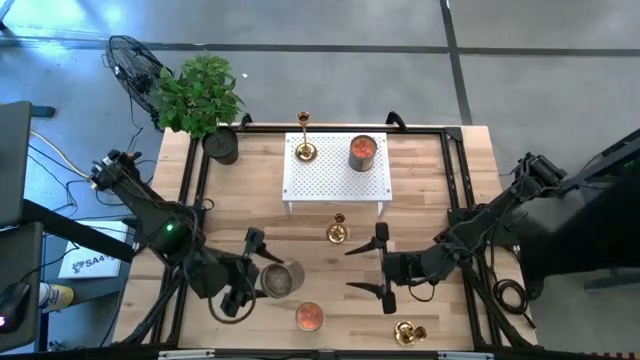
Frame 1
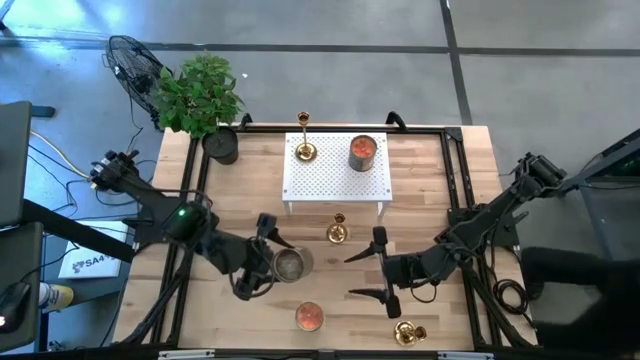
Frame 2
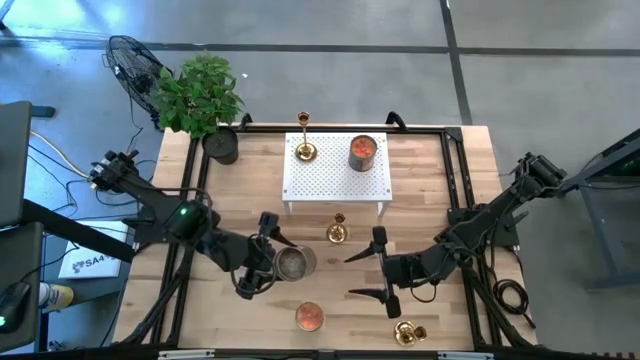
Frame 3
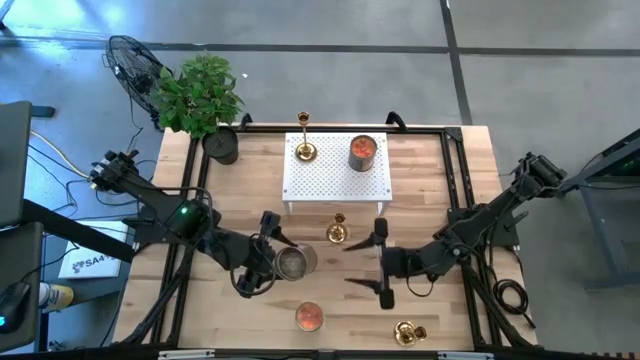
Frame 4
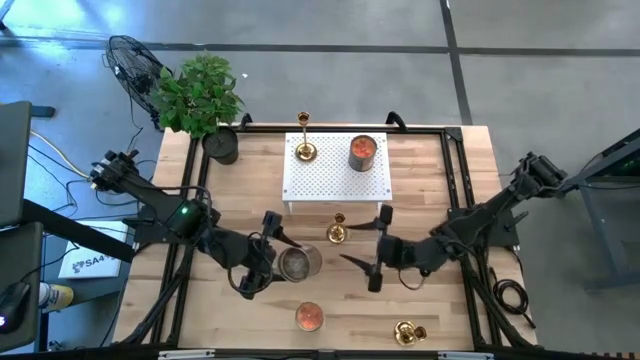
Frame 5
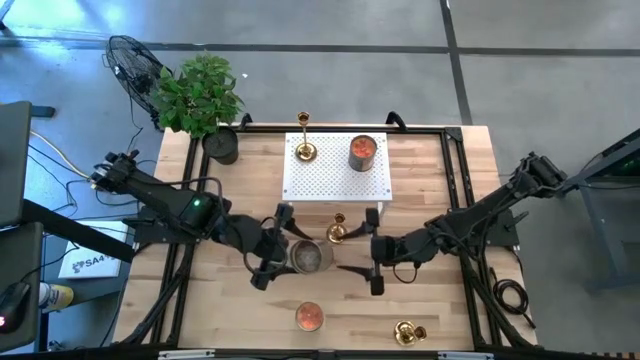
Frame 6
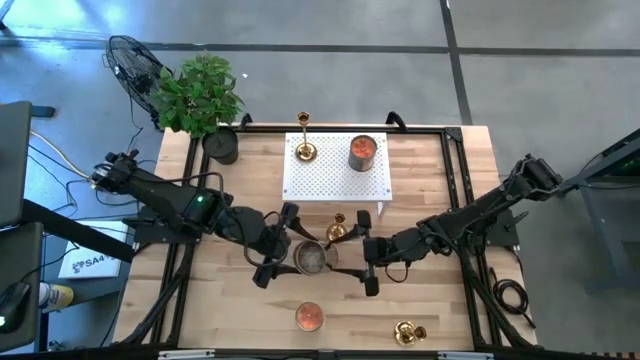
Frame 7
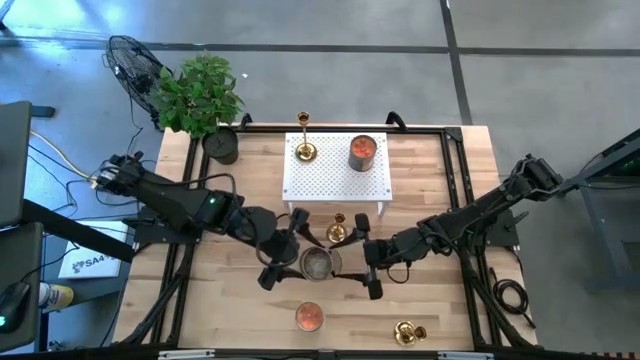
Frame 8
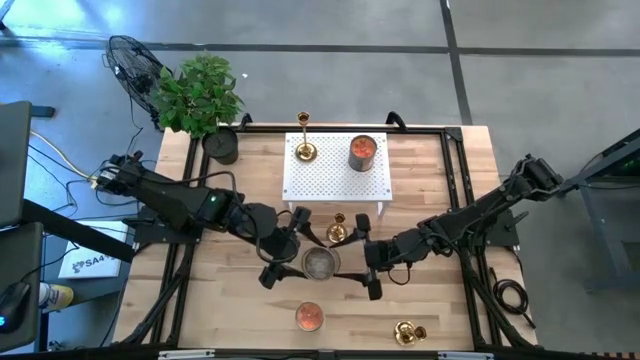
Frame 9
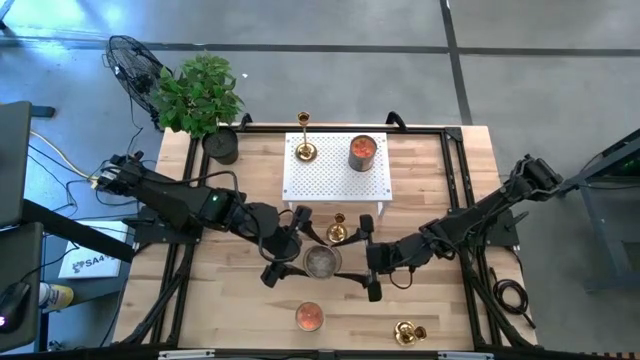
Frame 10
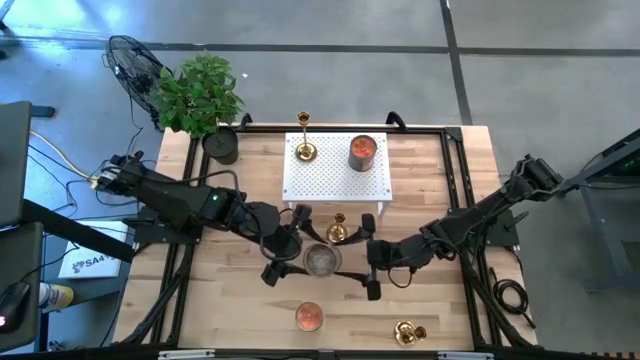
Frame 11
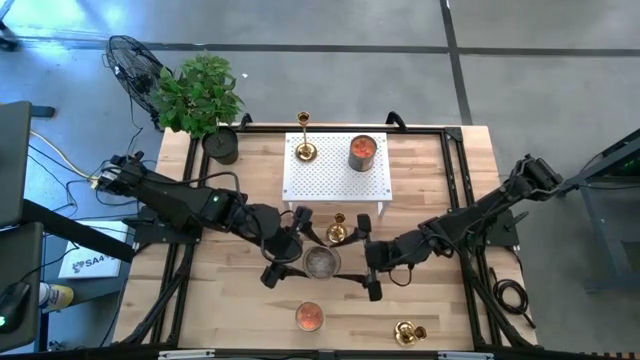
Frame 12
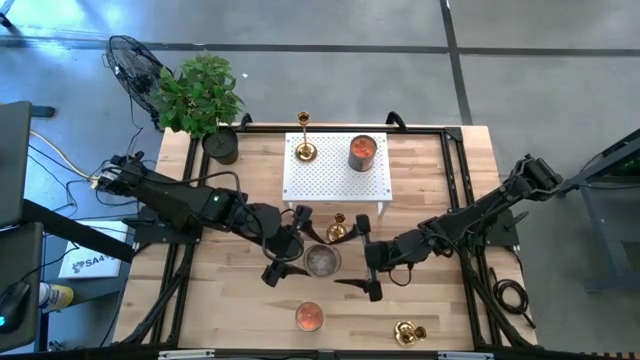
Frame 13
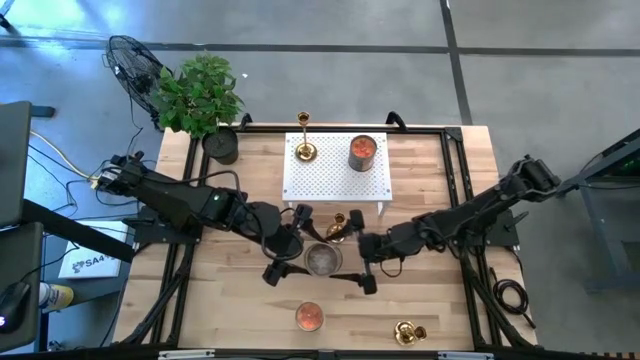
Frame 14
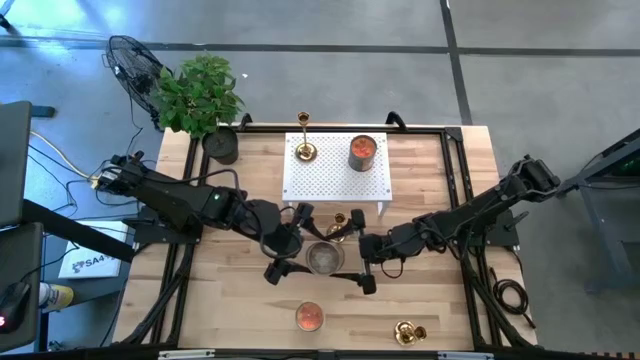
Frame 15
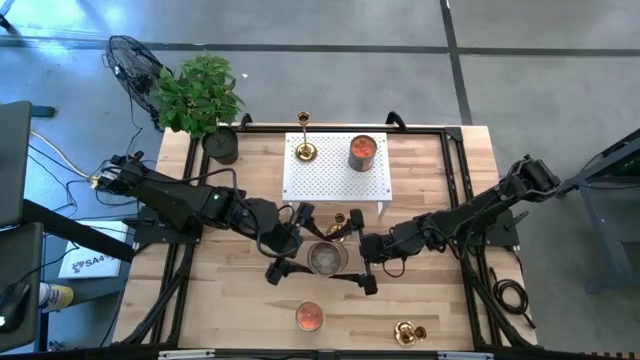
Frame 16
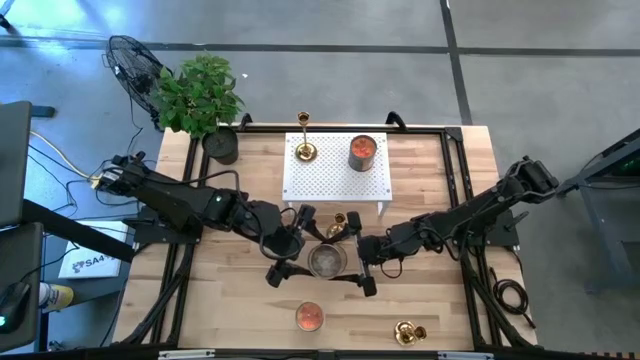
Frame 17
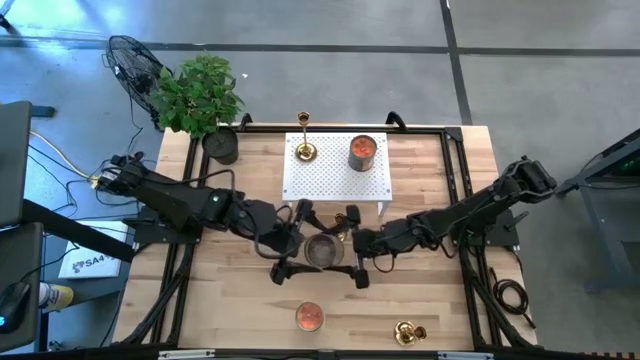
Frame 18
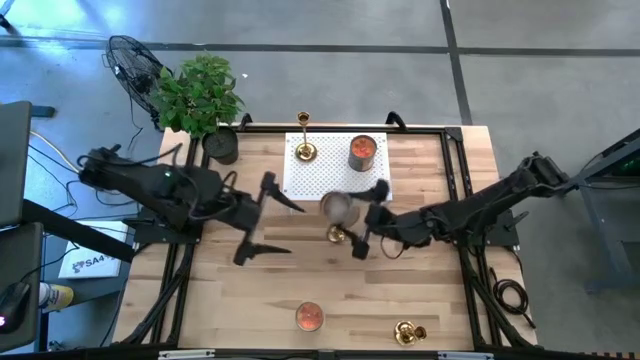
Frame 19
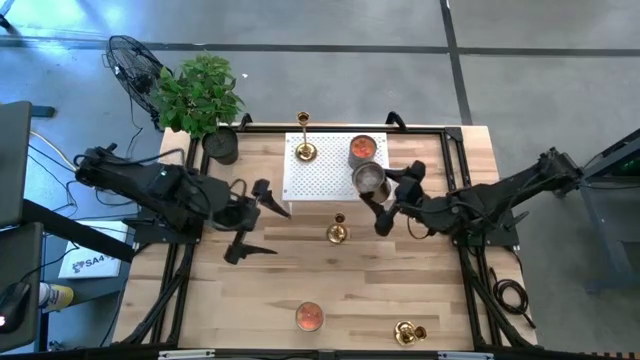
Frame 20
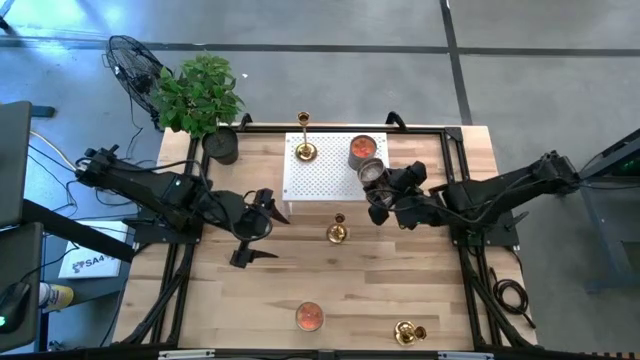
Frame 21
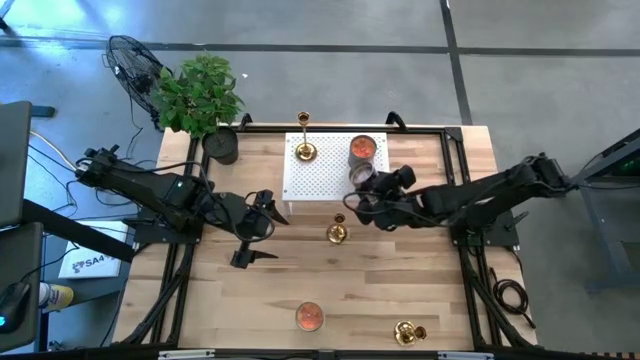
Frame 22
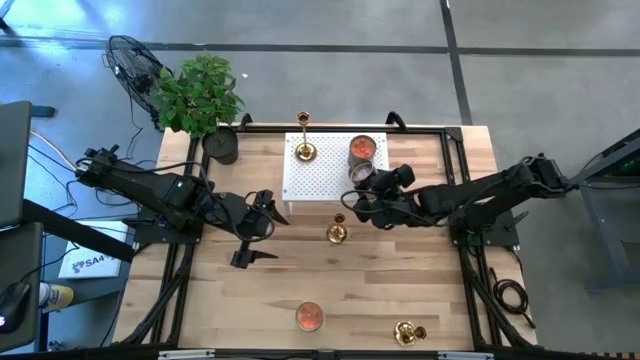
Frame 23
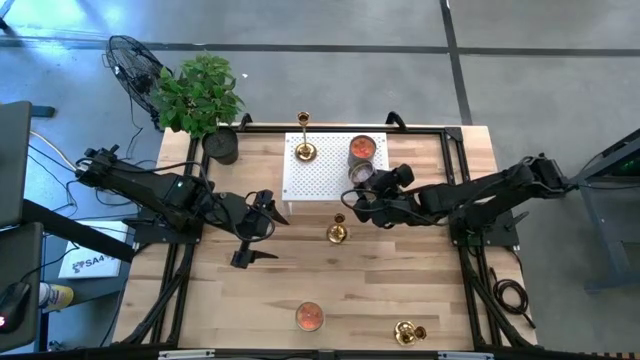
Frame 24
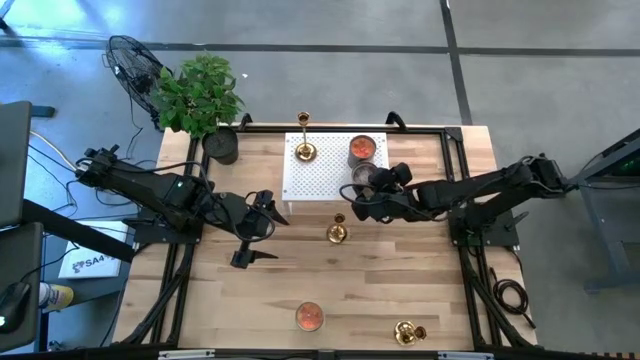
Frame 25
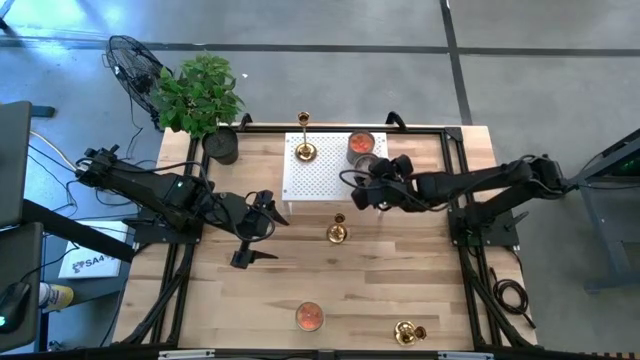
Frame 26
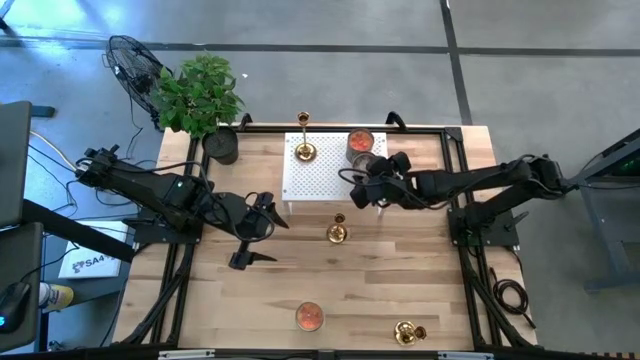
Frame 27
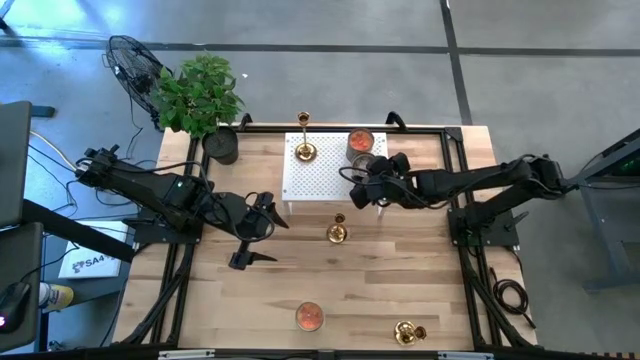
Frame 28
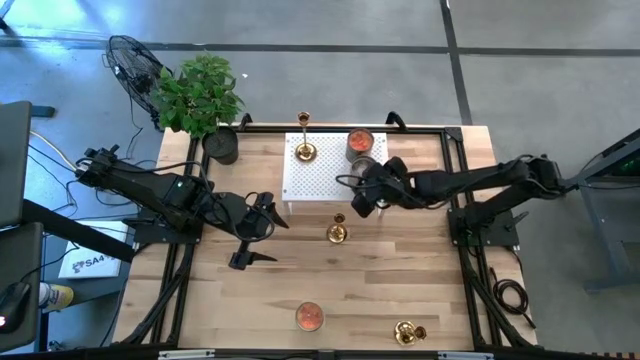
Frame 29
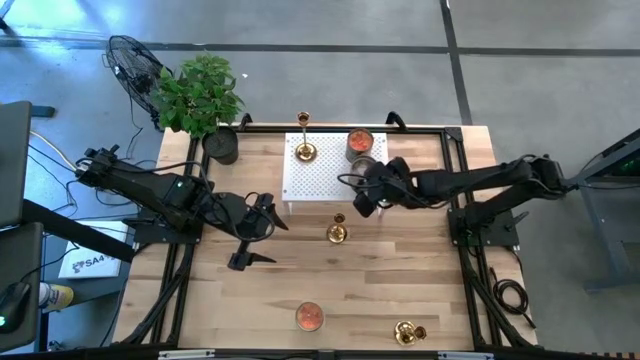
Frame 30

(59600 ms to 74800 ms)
Task: Pick & Place candle stick holders
Put the brown candle on the shelf

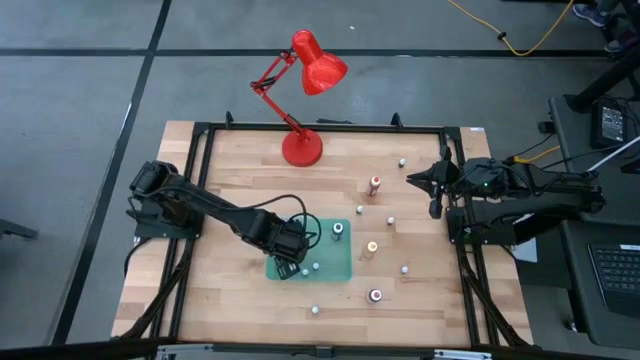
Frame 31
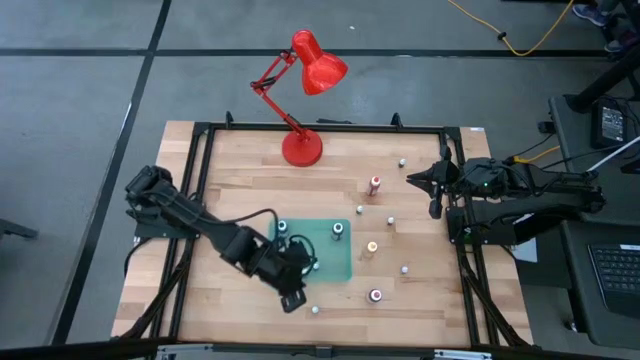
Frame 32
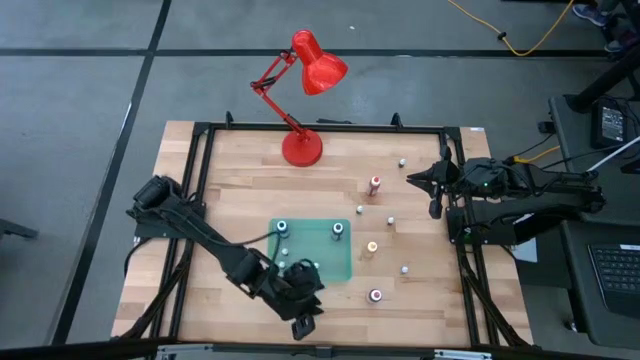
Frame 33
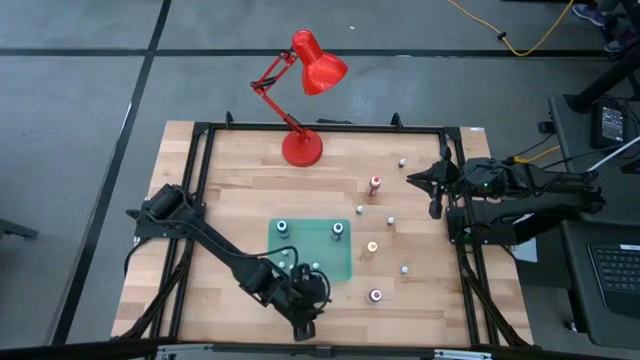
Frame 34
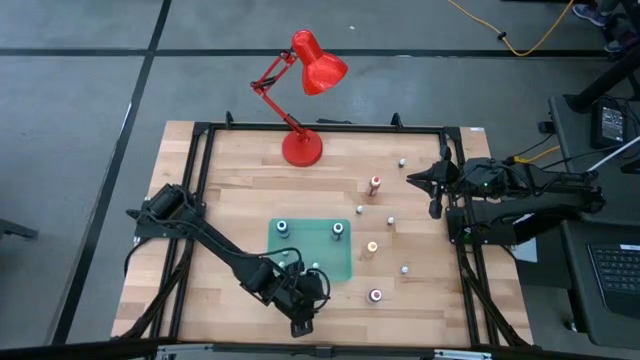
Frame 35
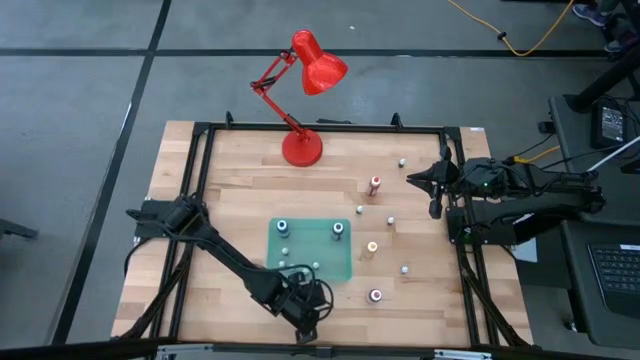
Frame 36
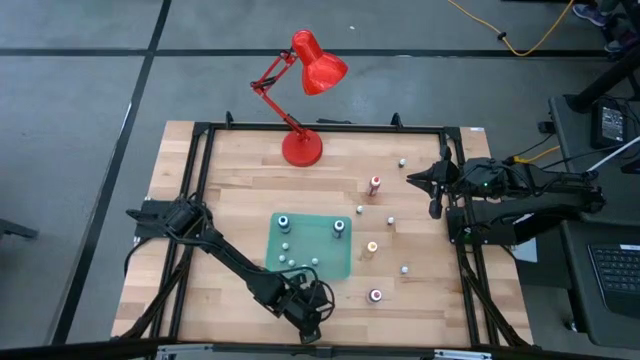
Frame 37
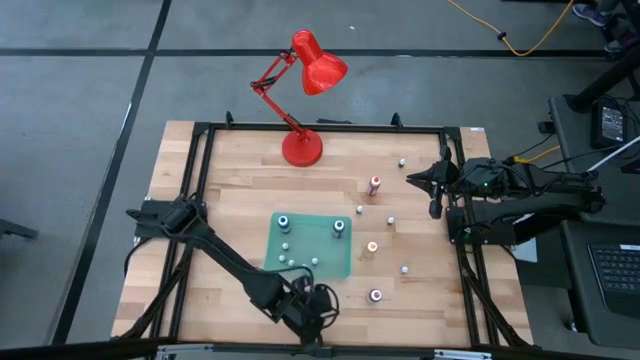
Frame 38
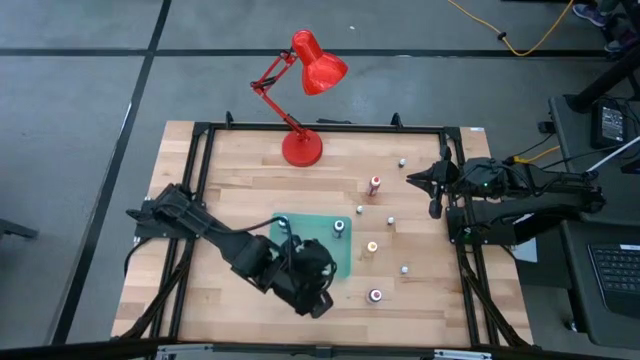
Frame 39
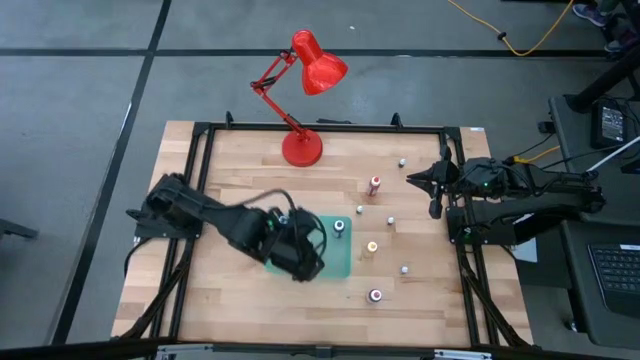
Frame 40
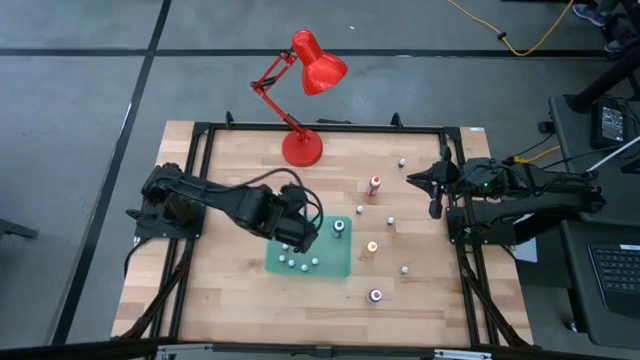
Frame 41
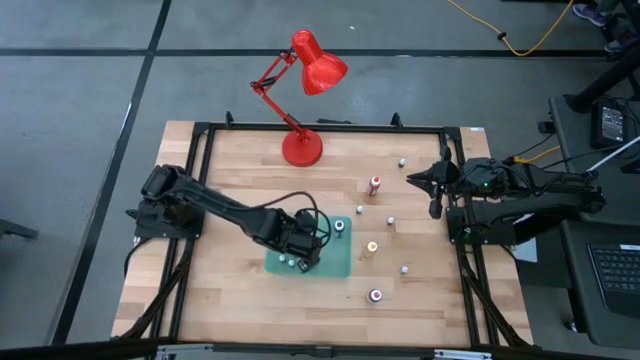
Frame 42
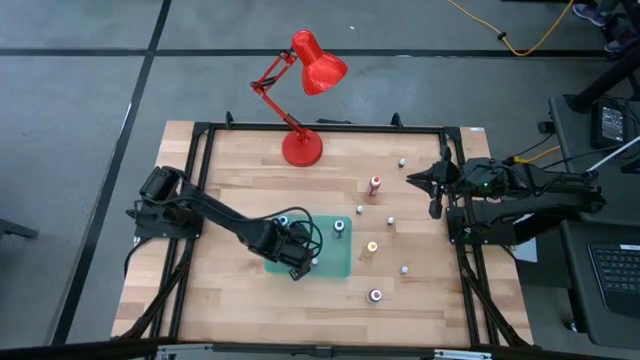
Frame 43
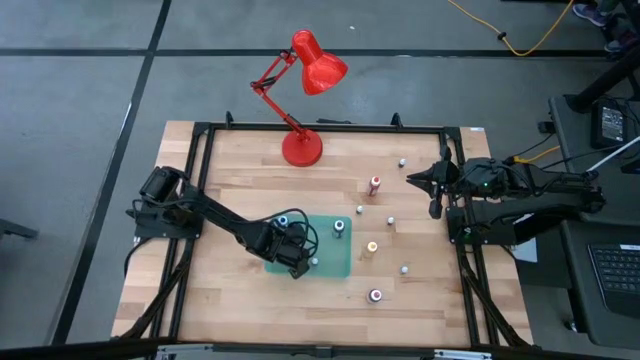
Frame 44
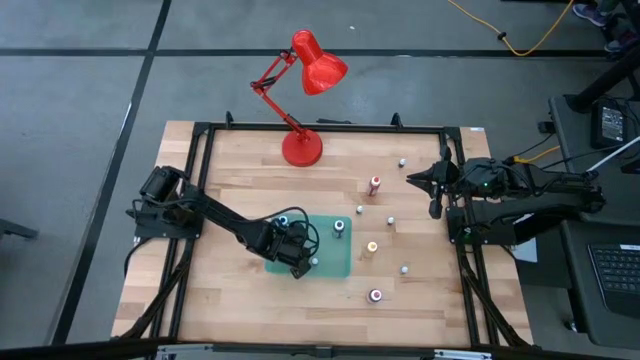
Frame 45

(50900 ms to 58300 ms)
Task: Pick & Place food coloring
Put the small black bottle into the green bin
